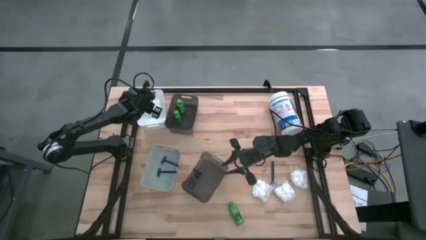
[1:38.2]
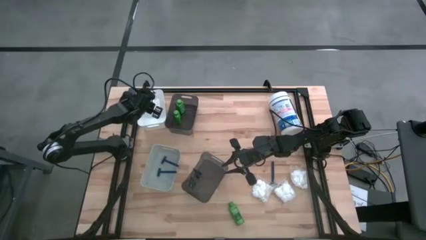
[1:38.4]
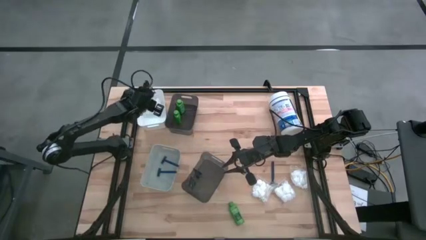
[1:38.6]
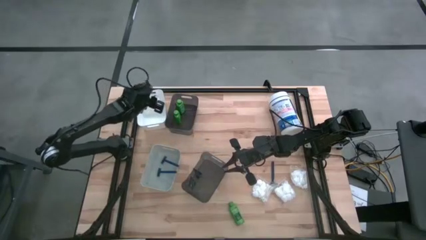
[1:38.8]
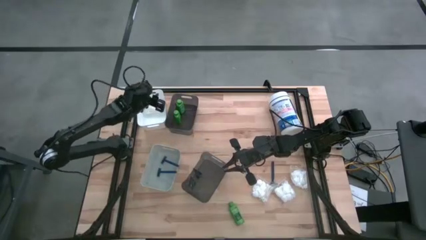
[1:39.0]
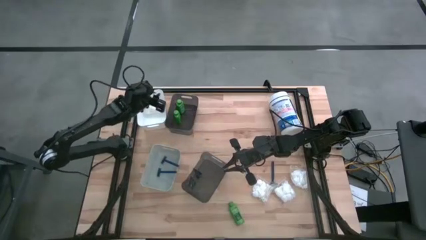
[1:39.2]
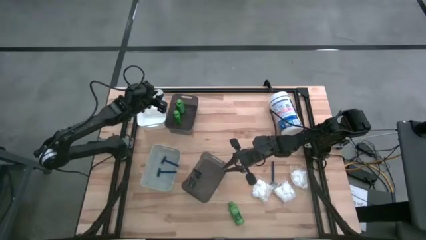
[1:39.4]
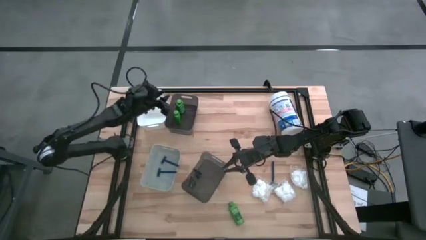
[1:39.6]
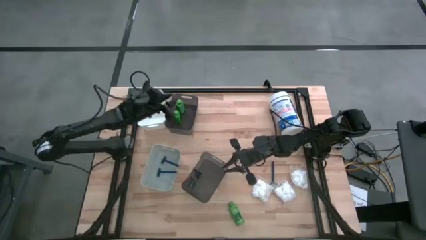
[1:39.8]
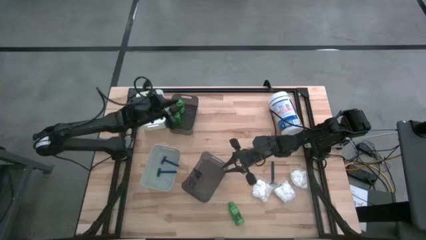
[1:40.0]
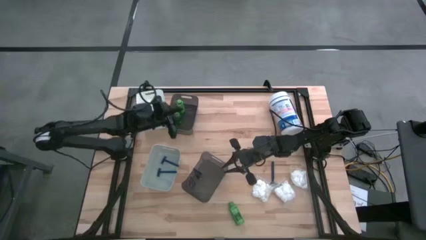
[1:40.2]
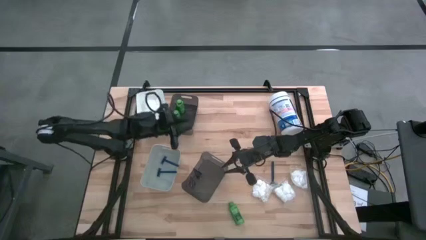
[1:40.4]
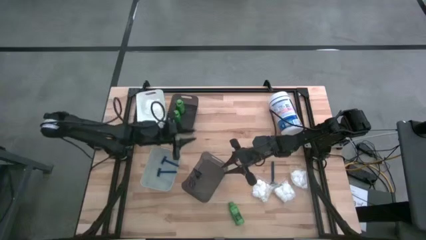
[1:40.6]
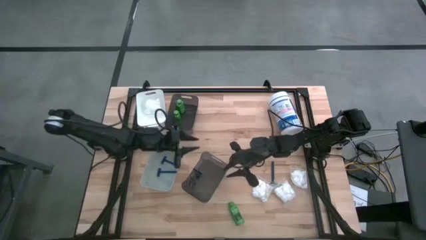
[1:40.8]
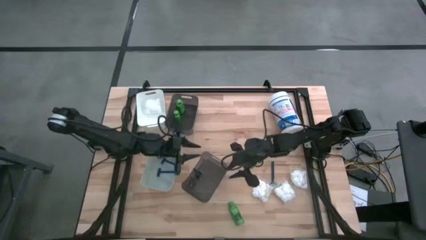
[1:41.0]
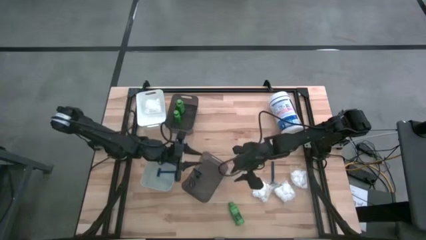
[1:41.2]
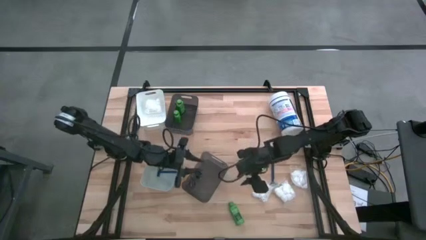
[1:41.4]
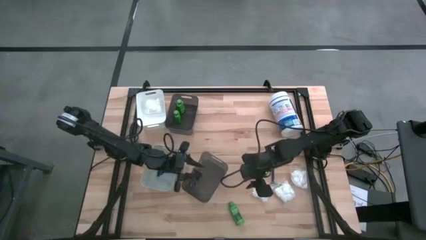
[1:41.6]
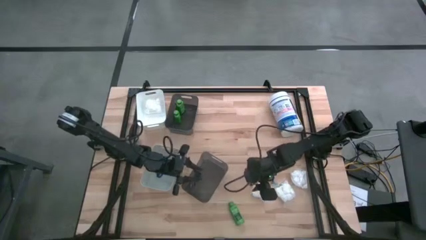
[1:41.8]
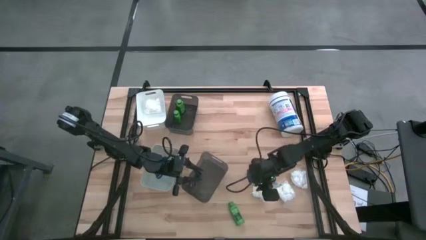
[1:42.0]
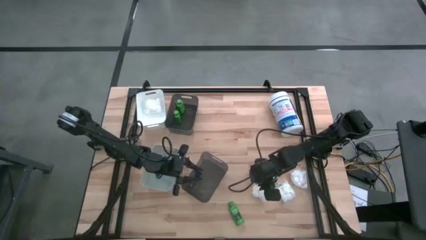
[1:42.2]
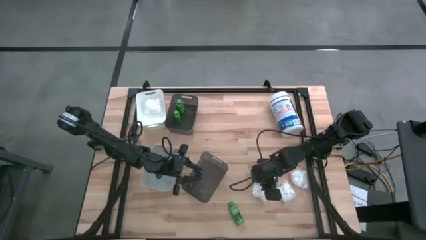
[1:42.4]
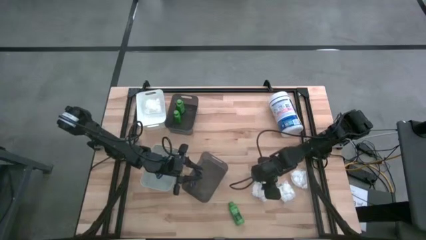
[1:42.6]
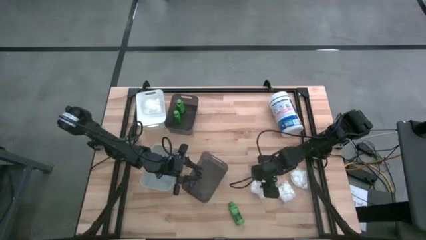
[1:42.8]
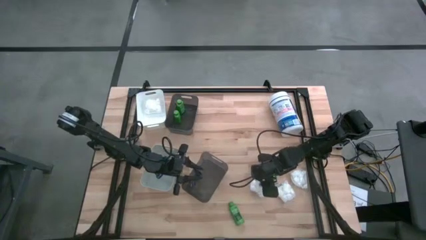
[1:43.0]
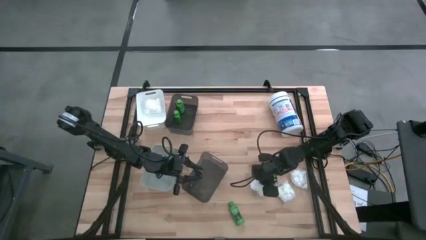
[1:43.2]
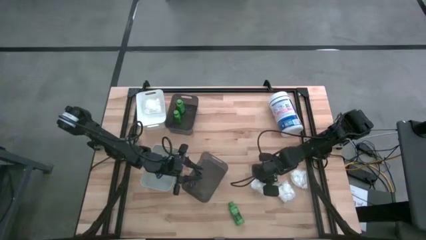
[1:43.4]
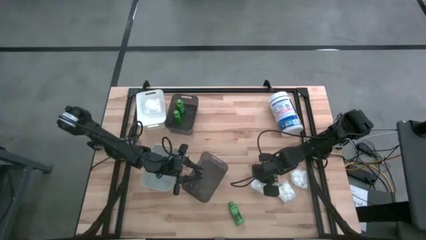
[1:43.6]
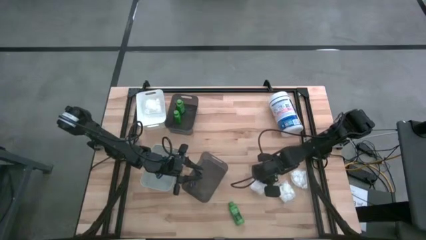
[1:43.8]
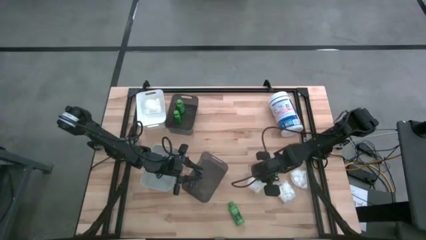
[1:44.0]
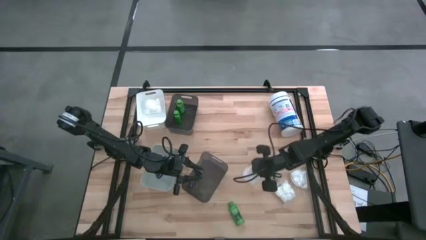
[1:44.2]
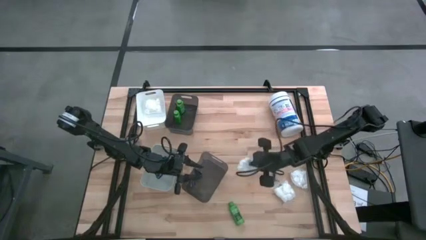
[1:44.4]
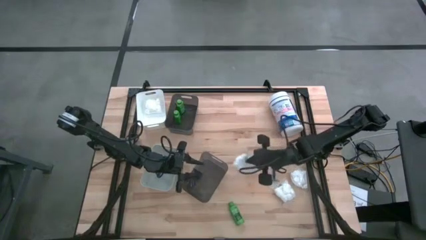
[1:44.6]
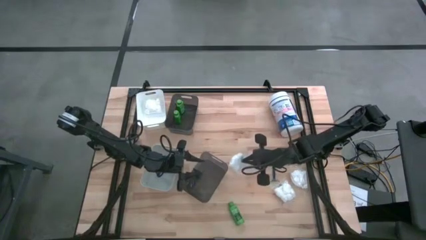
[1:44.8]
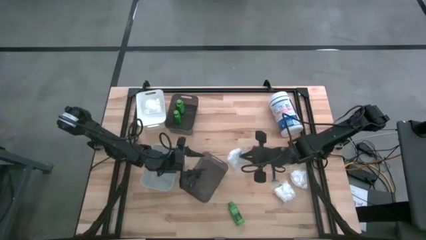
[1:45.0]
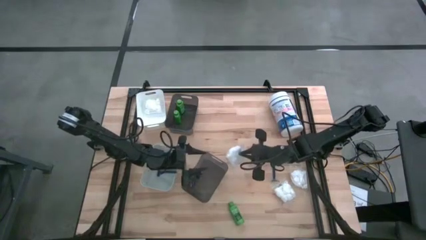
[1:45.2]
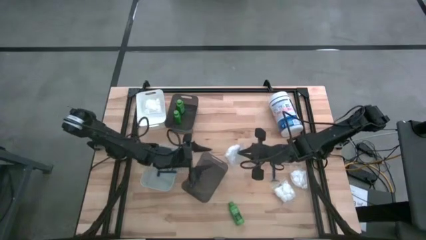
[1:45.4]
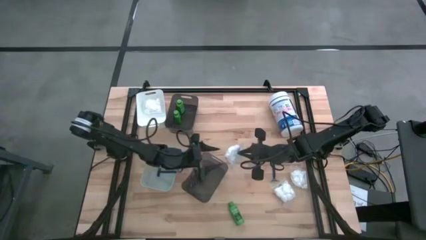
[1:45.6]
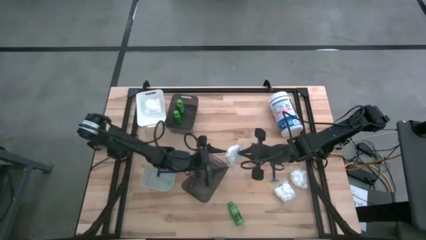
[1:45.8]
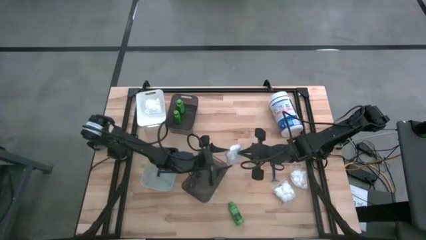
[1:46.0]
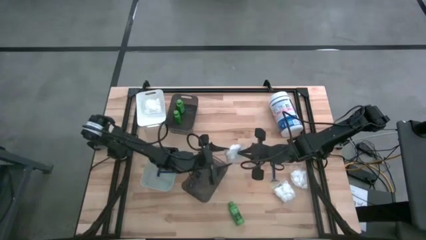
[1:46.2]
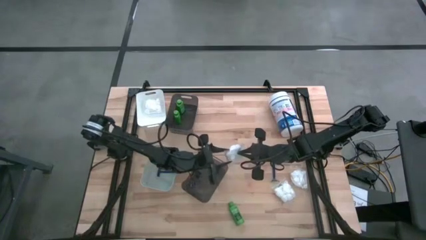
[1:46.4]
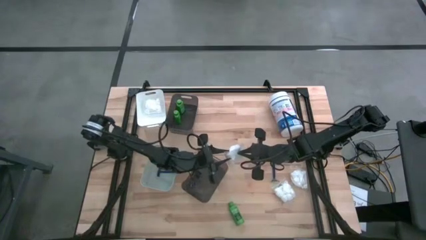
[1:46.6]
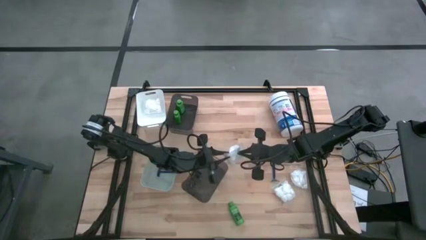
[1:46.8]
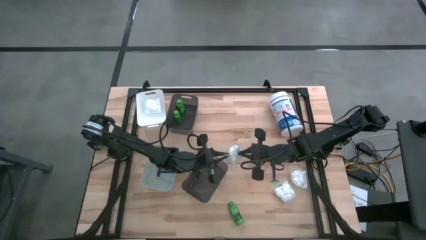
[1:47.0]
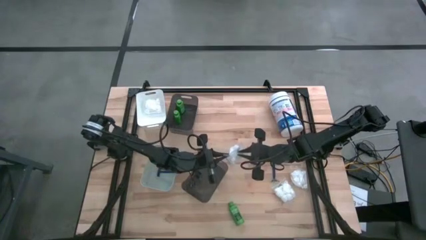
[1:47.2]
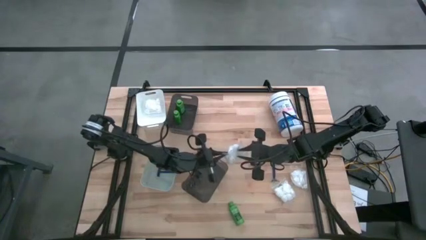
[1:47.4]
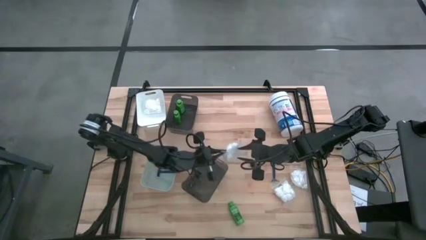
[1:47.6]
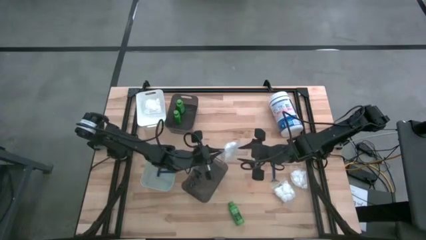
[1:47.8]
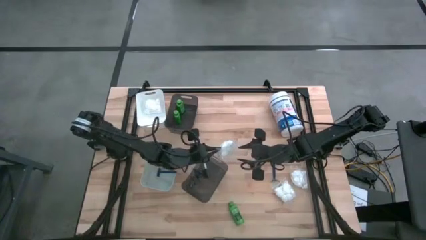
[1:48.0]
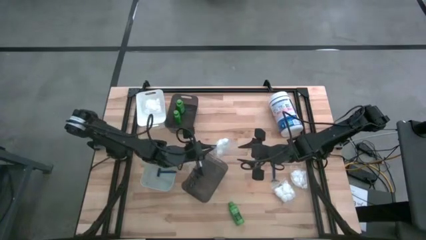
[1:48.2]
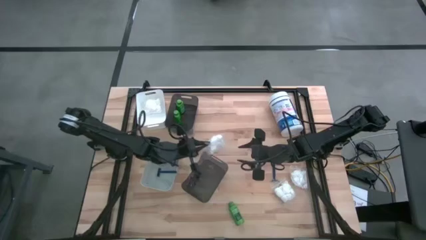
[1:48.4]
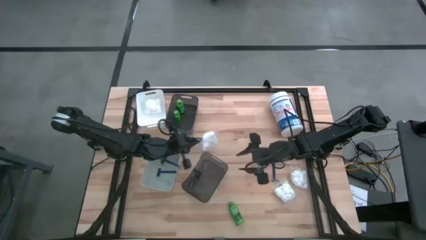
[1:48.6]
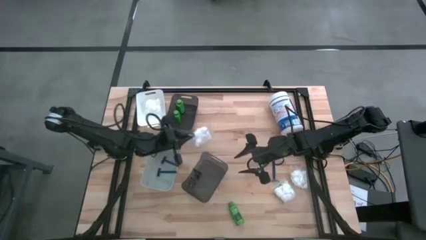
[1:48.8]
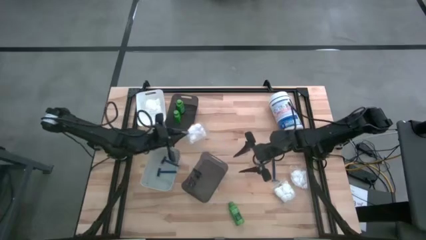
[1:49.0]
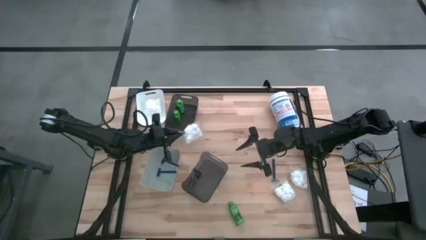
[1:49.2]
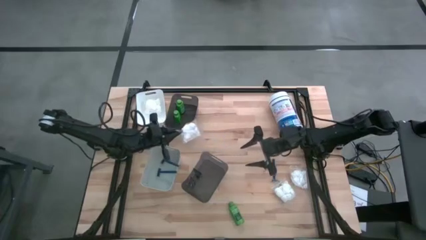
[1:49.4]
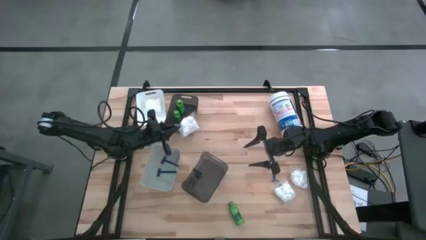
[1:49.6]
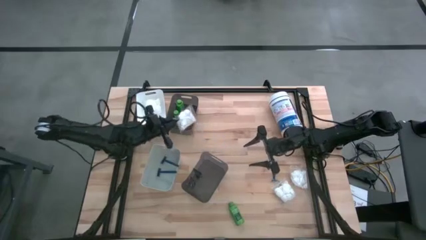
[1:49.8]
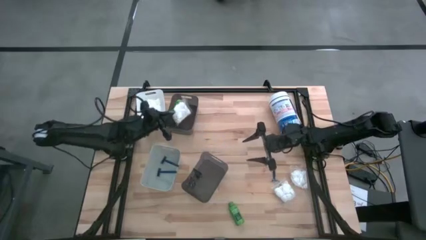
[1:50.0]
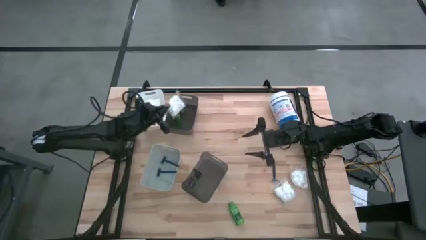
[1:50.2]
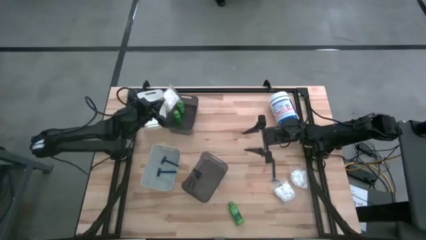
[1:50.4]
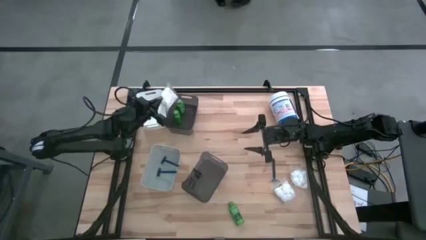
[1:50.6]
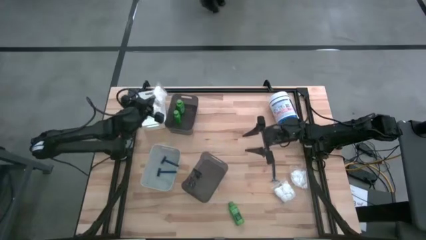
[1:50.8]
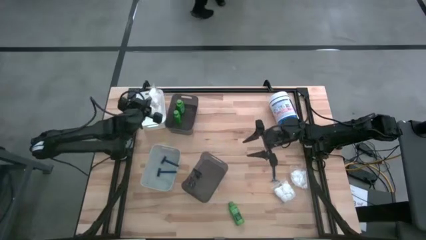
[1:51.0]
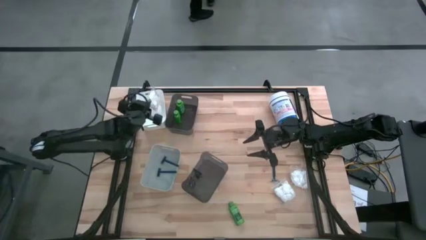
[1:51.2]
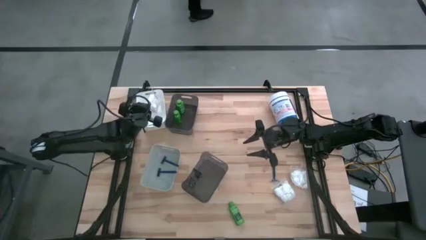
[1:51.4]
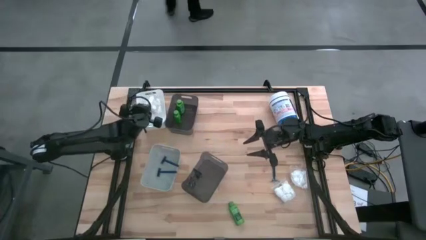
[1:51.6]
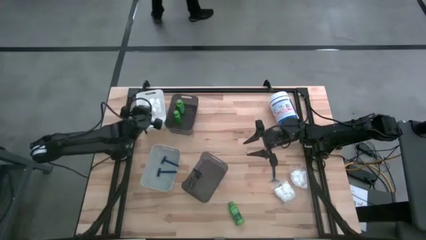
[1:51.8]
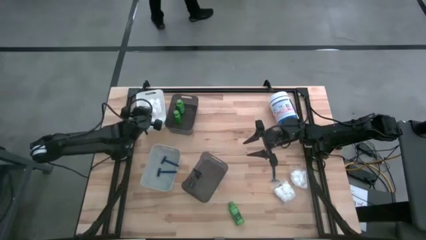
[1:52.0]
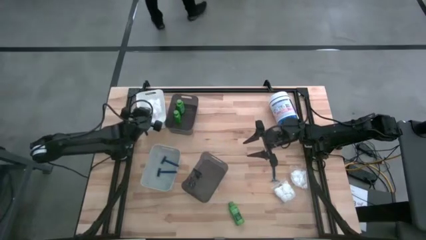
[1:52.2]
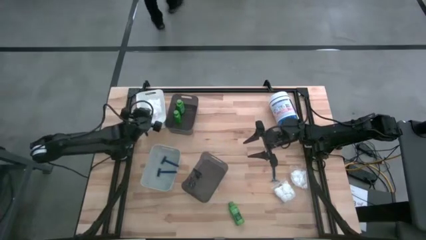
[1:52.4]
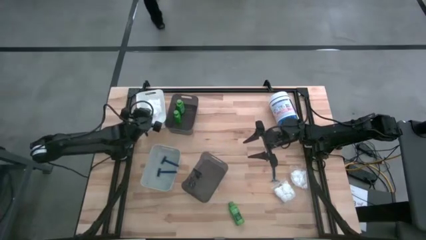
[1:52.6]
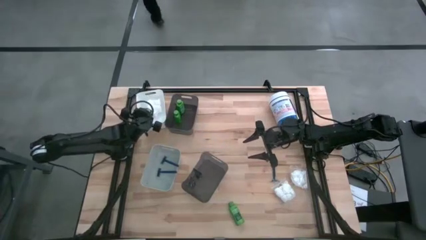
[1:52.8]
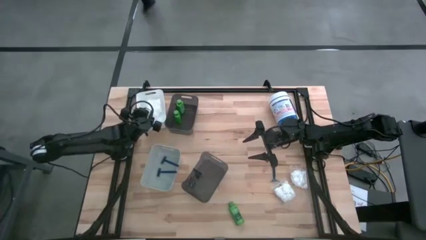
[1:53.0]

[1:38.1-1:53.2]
Task: Pick & Place Travel size toiletries
Put the cotton pack into the white bin

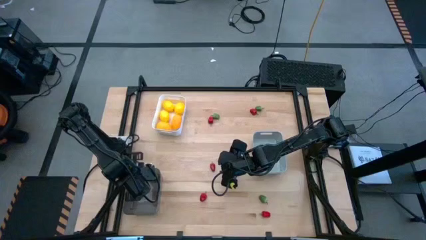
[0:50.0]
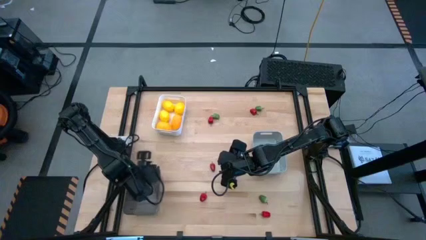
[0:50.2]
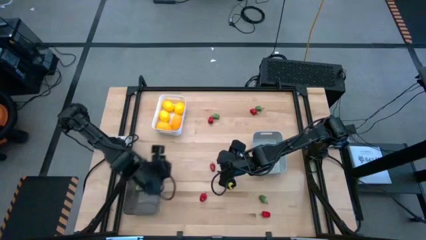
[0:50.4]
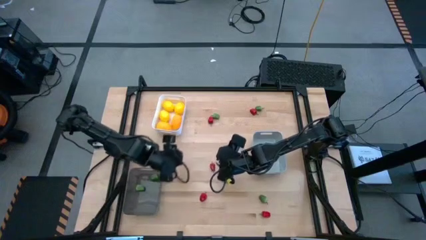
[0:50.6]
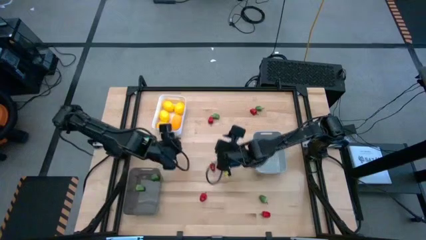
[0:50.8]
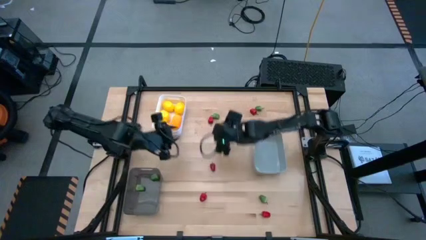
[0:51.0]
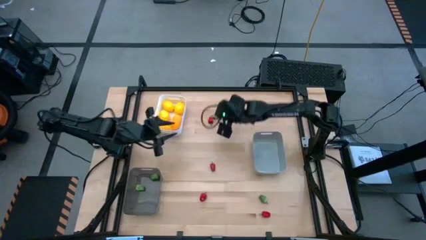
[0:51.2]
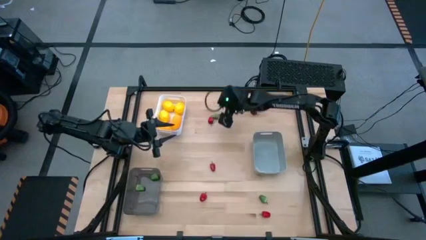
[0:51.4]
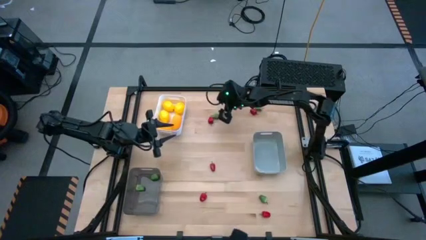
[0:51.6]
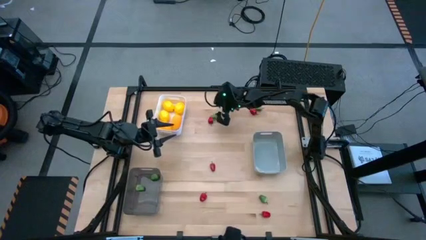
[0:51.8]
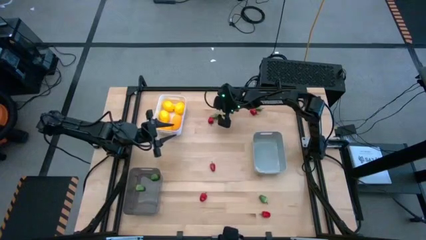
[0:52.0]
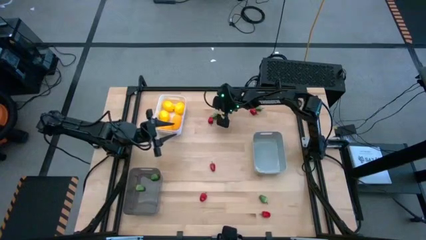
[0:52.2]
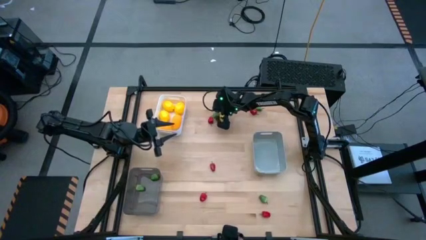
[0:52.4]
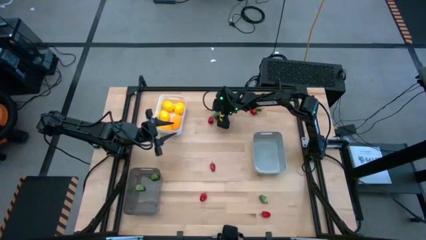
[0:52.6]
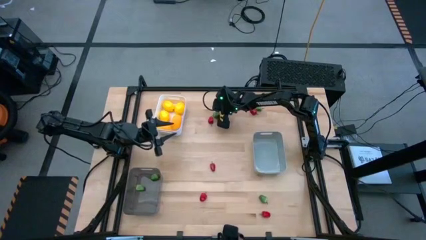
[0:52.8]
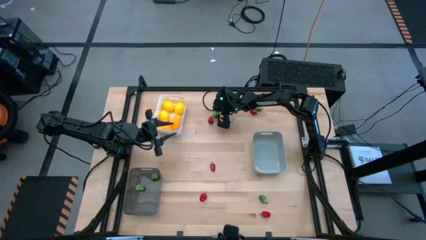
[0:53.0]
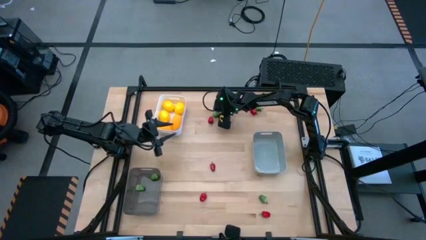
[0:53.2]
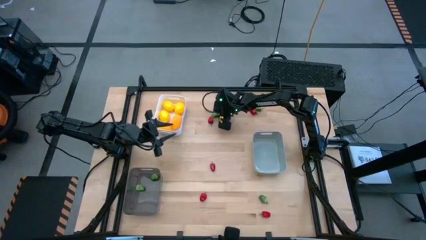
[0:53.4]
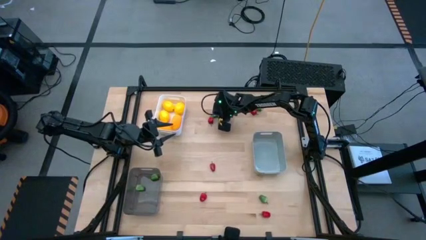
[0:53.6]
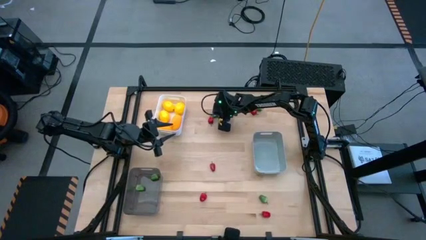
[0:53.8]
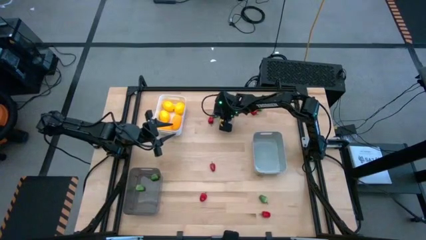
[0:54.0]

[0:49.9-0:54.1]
Task: Sort produce into baskets
Put the top left green chili pepper into the transparent black bin
